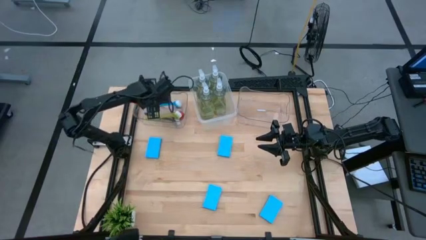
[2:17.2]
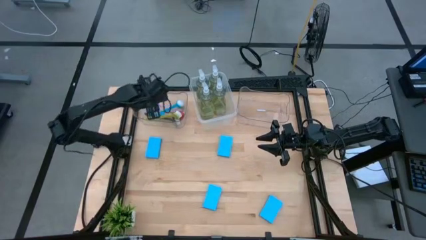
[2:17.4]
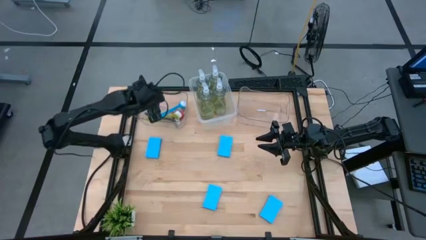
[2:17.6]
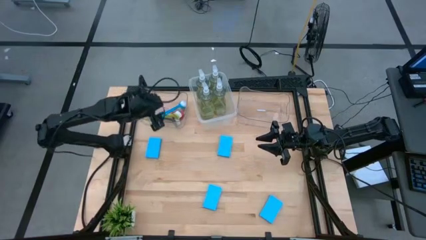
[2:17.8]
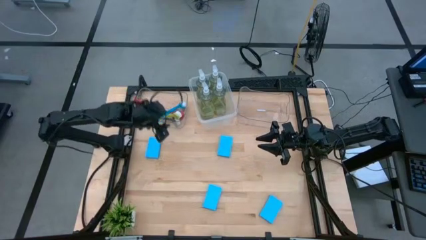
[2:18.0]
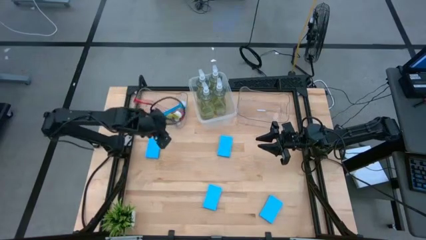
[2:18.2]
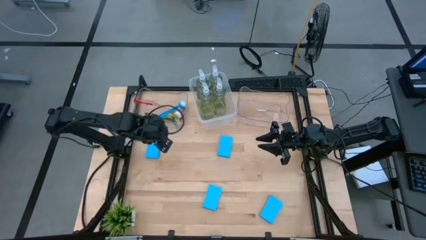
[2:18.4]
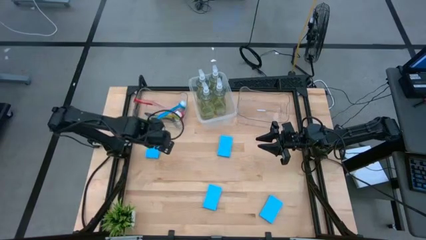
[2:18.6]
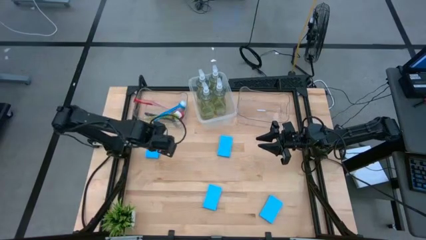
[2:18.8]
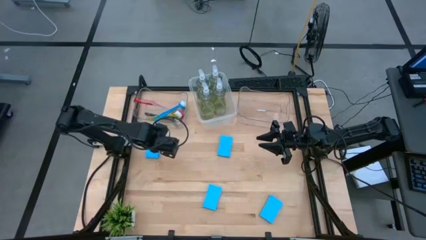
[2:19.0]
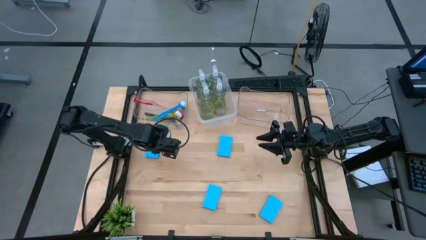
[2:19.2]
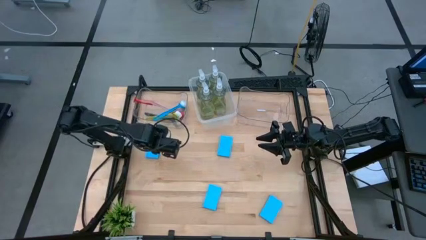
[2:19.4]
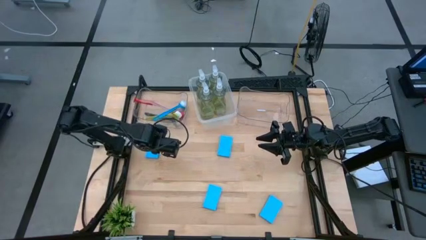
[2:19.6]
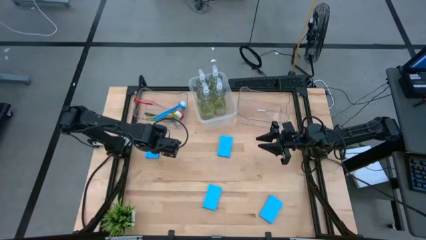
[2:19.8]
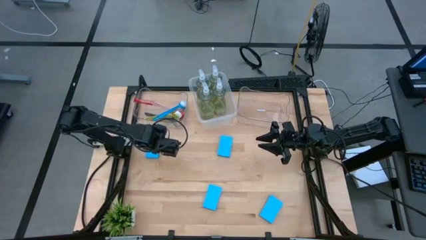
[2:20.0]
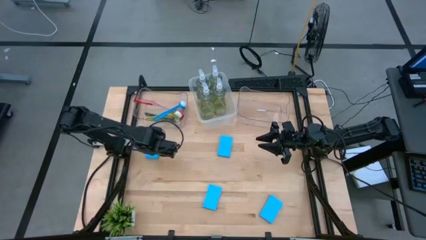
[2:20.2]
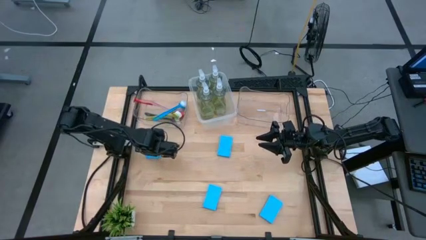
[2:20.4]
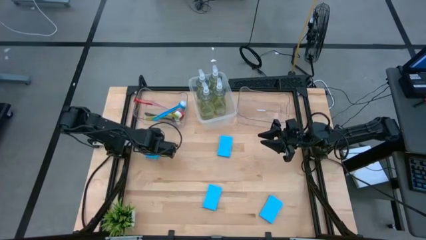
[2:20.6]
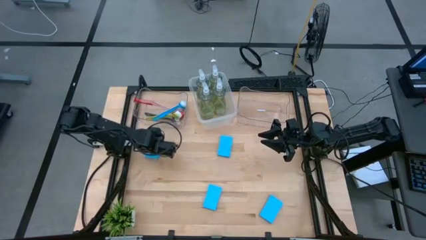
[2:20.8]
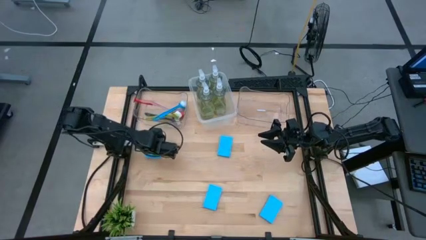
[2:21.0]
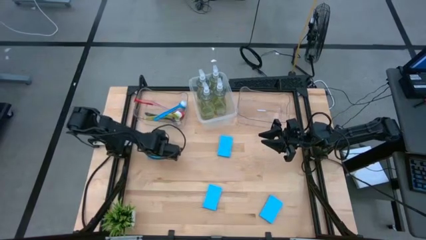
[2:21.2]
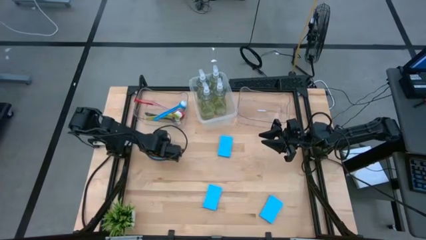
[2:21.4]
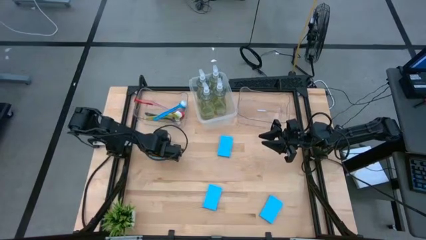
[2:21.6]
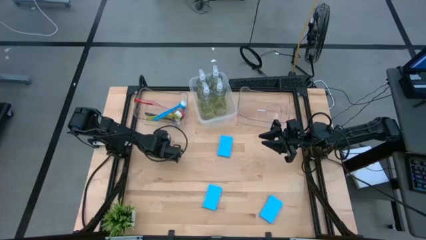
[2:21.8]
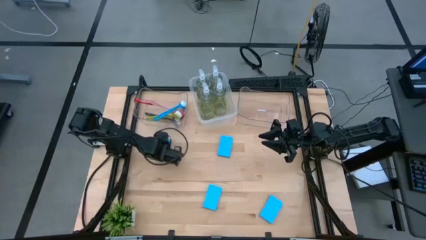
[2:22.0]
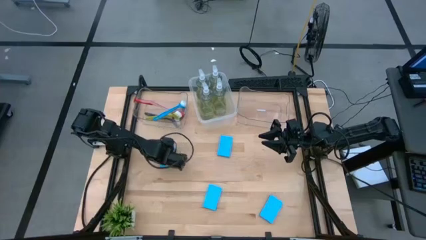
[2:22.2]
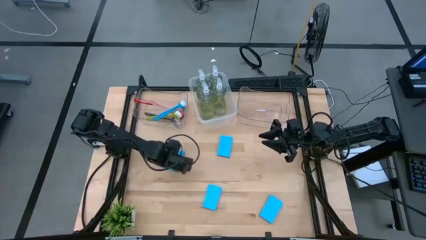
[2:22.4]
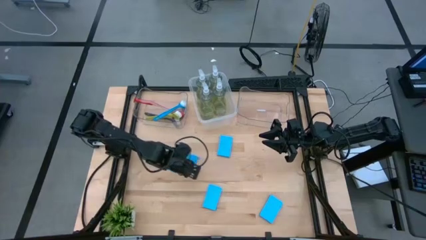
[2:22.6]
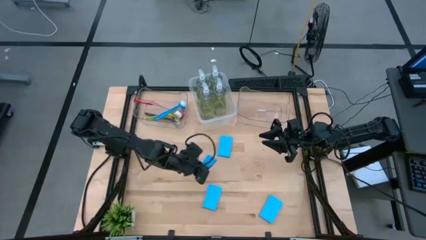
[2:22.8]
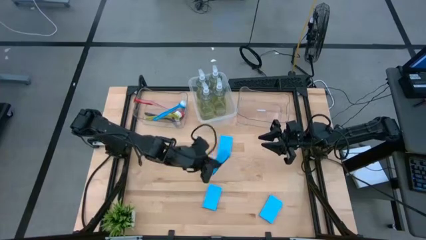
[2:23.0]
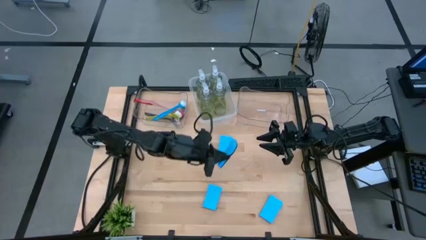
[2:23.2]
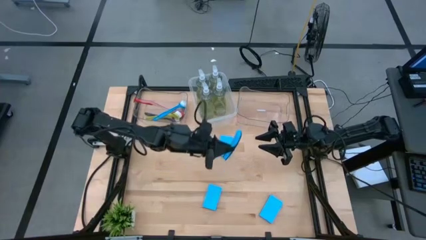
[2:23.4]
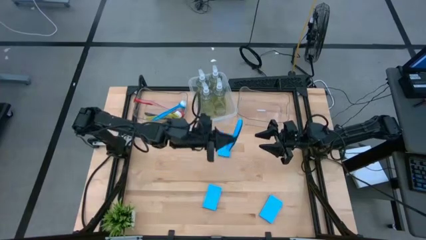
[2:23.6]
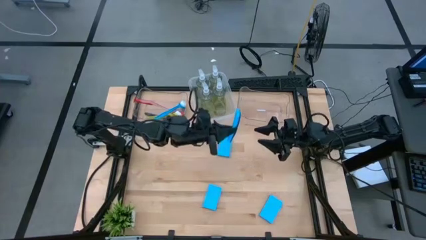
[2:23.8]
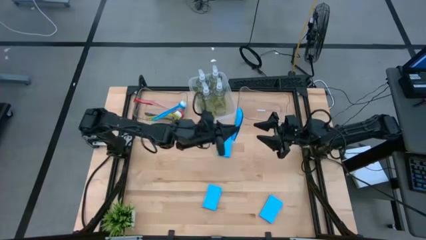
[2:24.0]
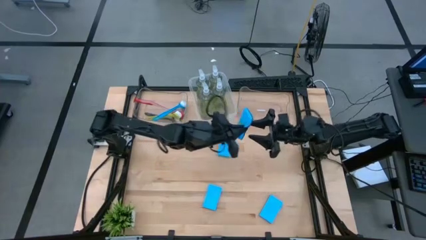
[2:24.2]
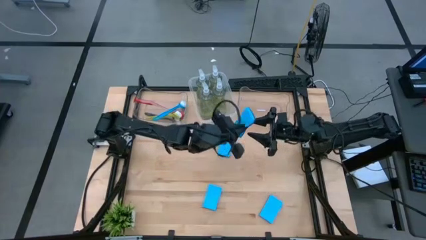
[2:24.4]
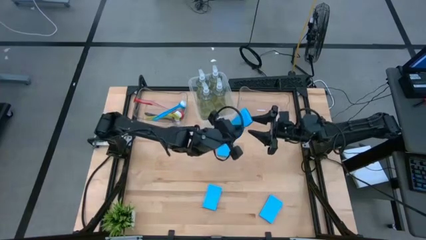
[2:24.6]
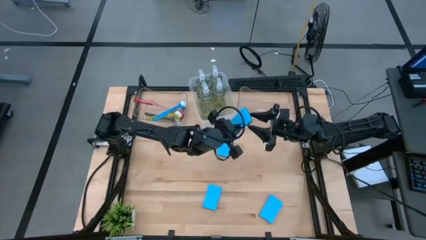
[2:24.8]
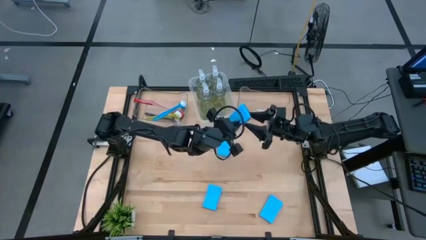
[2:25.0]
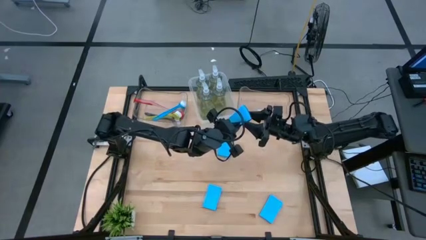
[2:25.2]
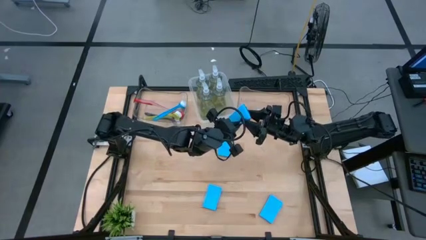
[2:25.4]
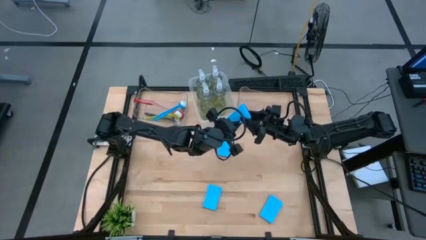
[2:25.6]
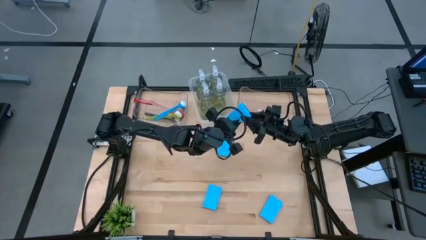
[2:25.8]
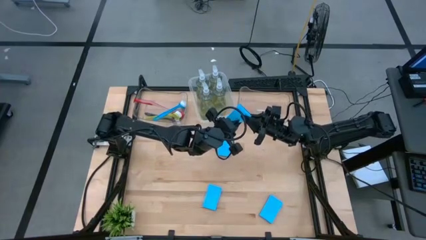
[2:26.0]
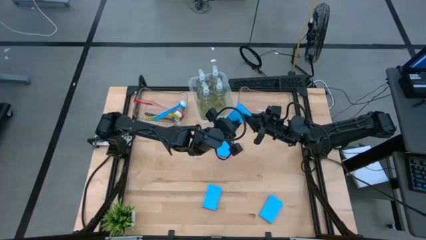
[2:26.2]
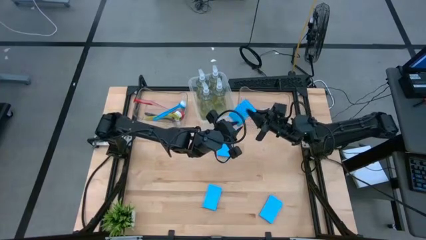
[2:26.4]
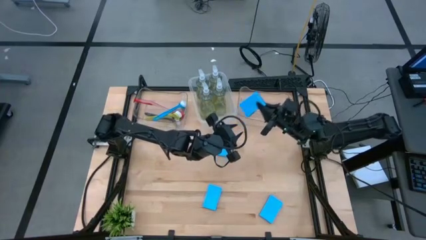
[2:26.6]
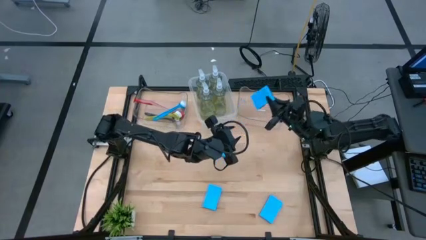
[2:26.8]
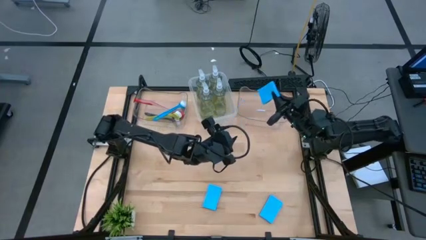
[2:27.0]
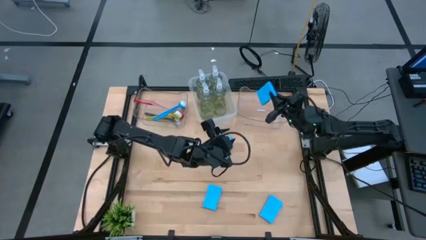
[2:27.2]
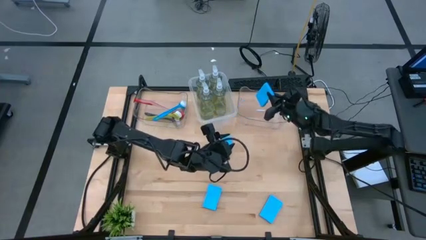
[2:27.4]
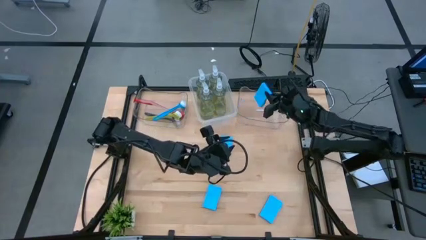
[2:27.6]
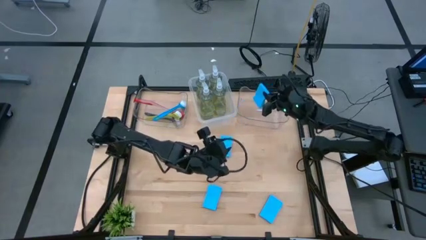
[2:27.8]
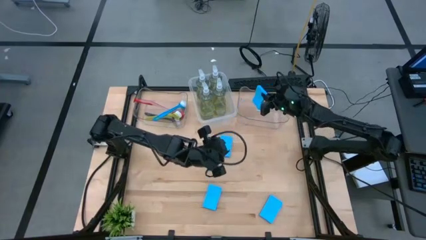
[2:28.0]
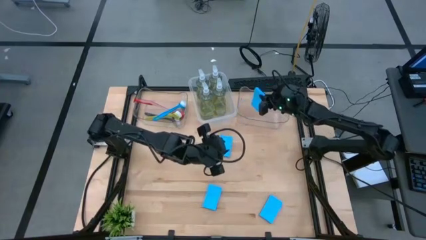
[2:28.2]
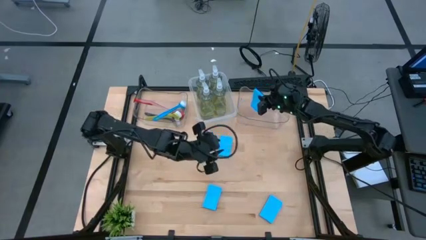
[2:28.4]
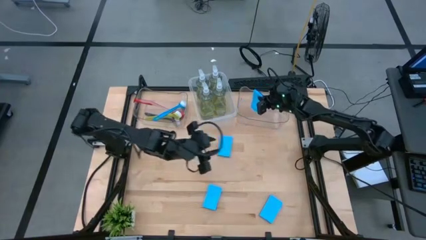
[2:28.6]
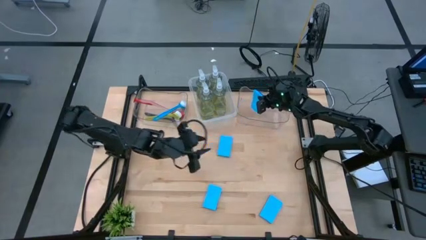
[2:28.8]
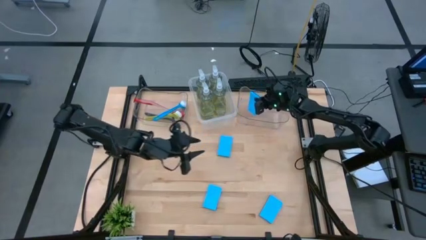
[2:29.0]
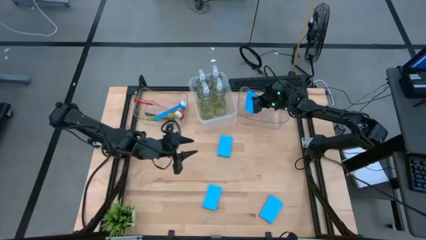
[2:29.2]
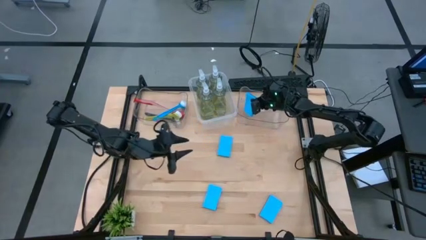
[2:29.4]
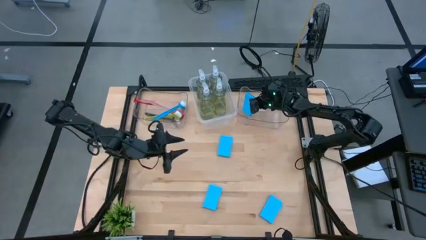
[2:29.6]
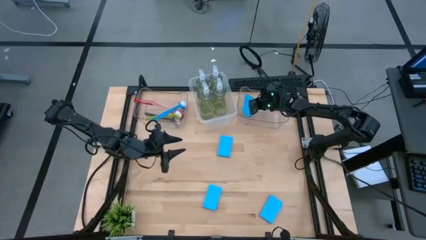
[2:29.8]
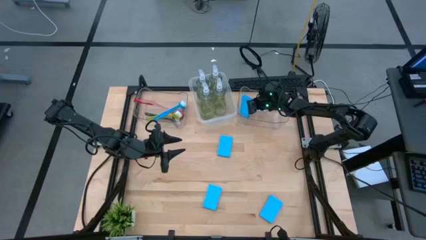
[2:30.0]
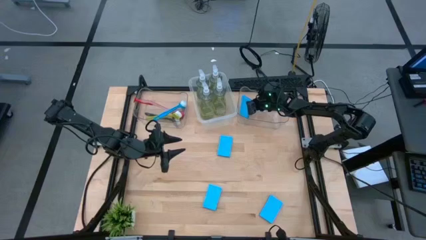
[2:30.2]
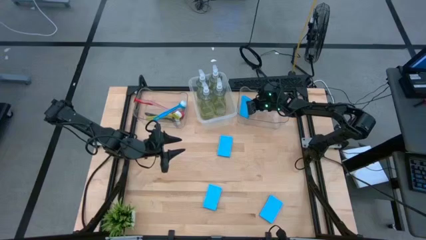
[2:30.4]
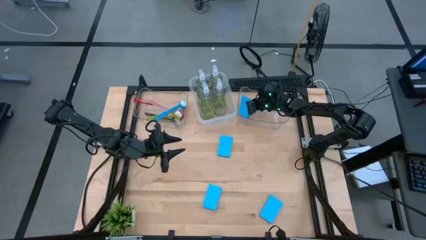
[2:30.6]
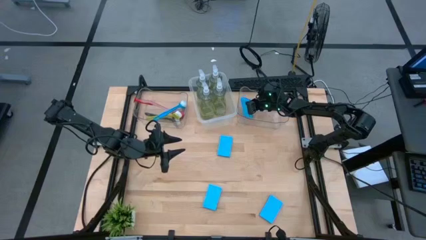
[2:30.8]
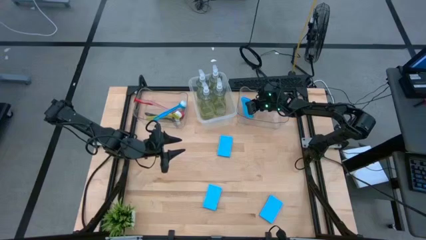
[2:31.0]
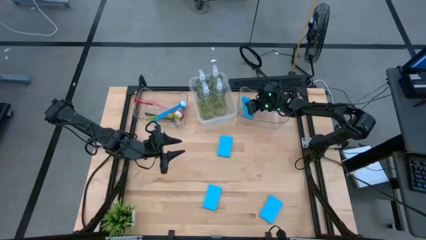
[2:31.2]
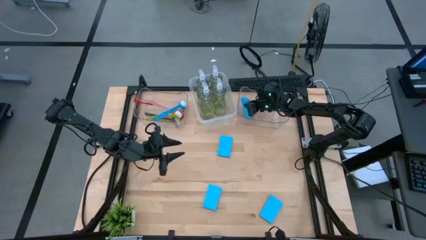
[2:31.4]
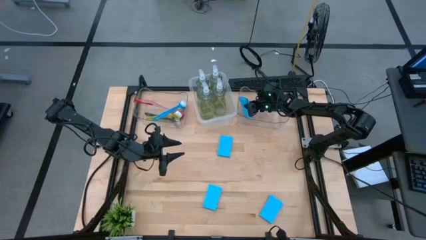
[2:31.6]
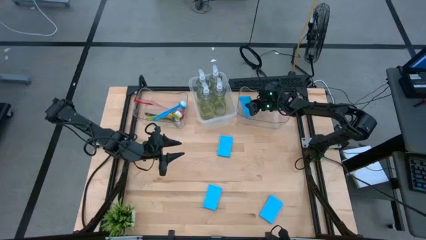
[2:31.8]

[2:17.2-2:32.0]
Task: Pick & Place Kitchen Sink Supplies
Put the blue sponge into the right transparent bin
